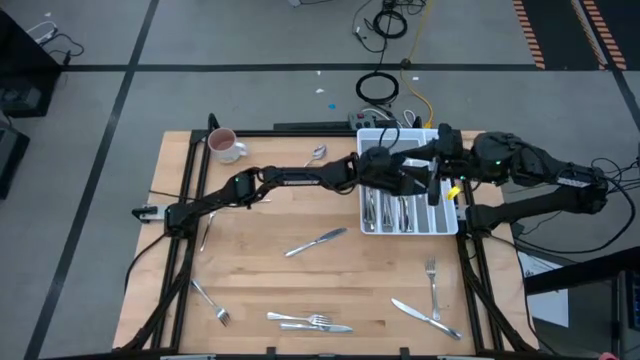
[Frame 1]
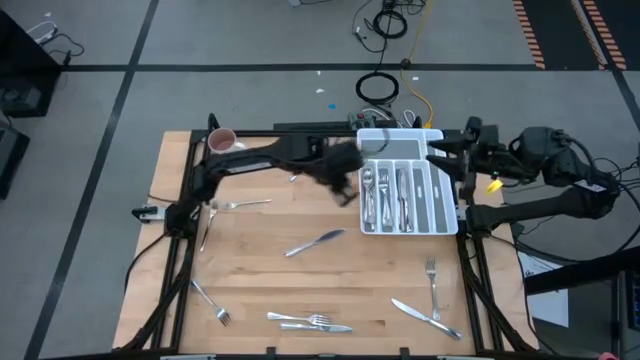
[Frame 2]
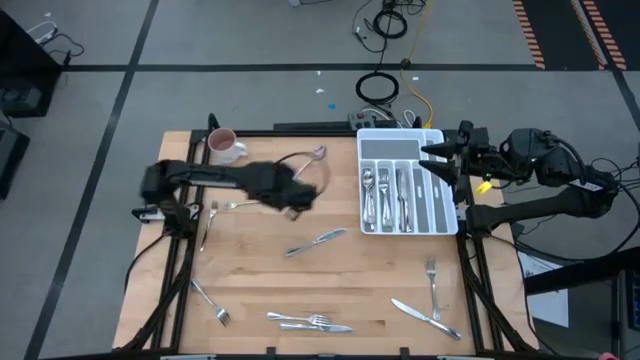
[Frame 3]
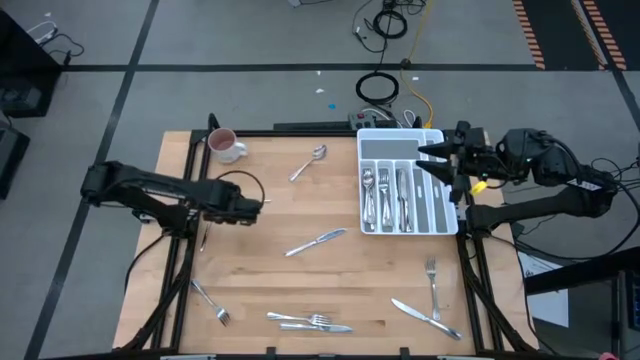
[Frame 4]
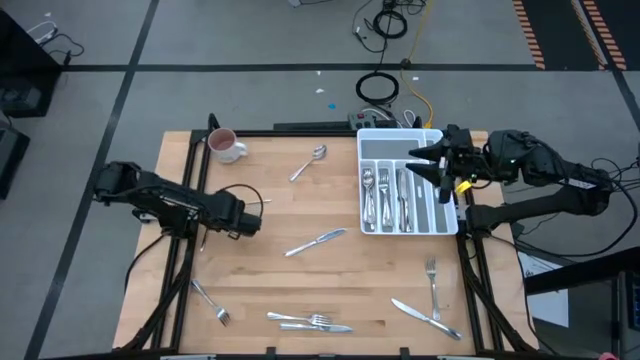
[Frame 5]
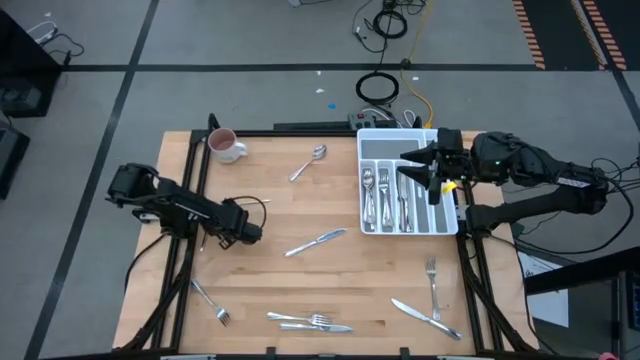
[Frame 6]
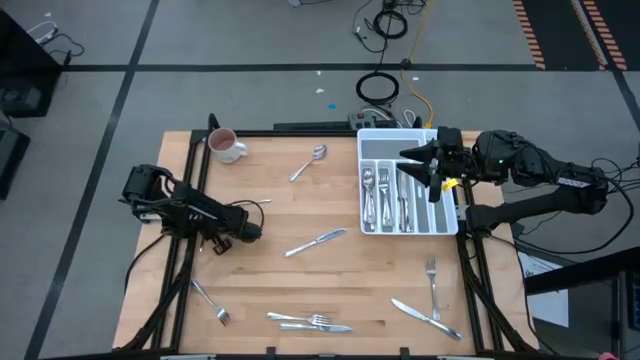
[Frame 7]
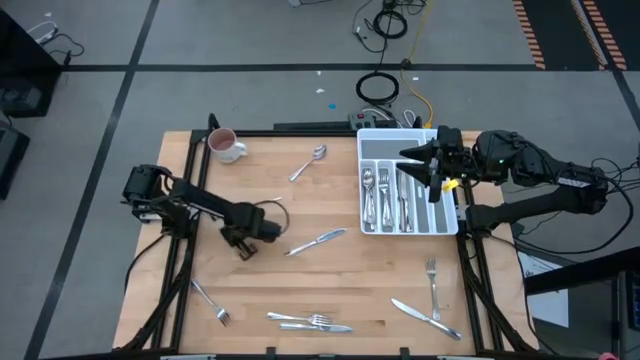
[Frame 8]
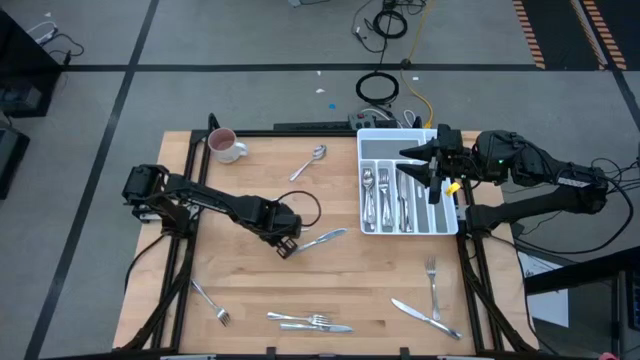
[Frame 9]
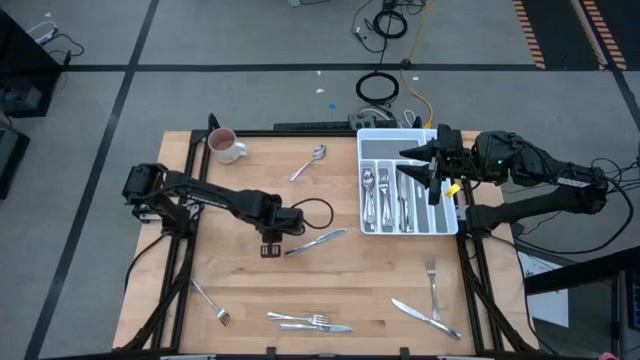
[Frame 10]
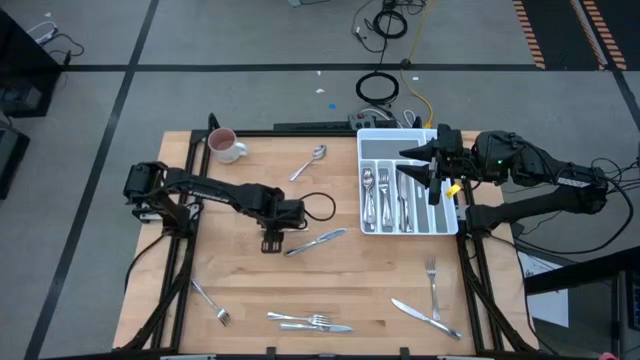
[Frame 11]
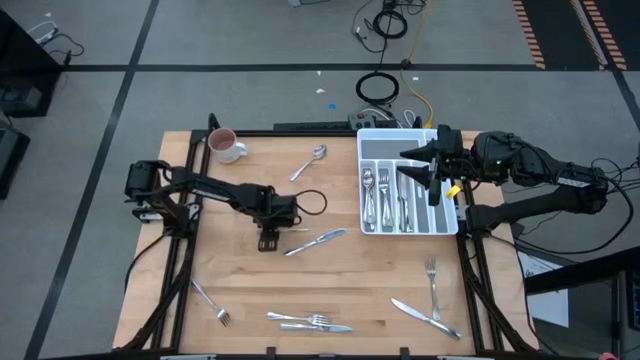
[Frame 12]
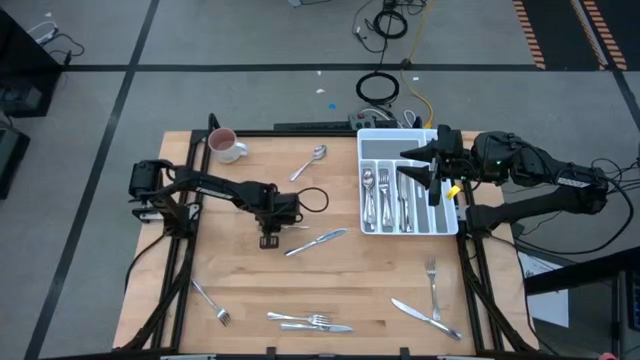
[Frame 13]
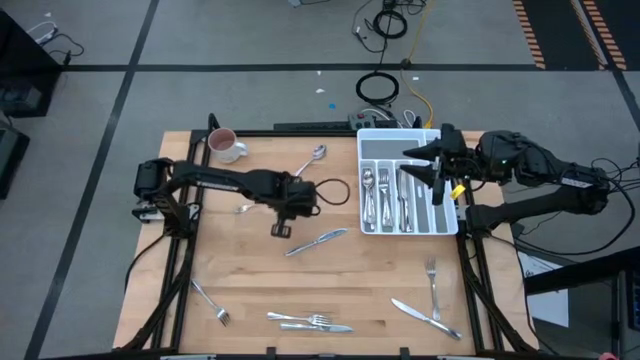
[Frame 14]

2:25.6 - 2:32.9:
Task: Sort silverware
Put the silver fork into the silverware tray

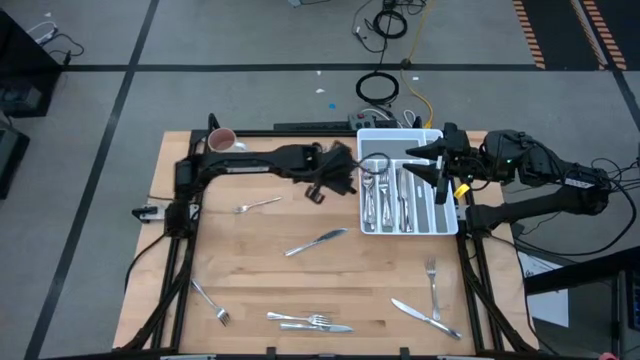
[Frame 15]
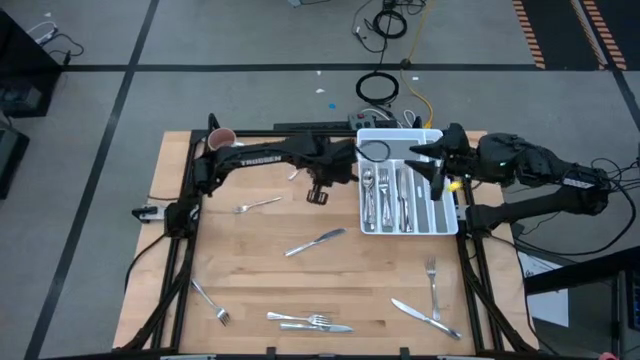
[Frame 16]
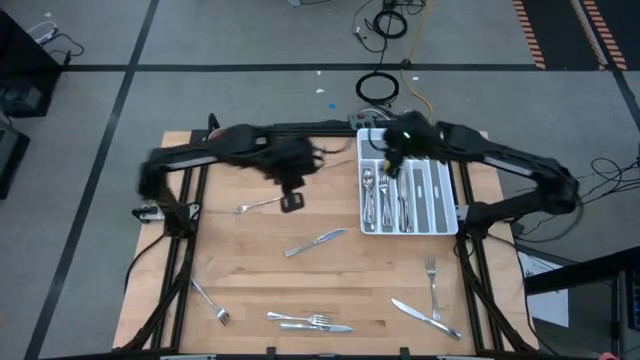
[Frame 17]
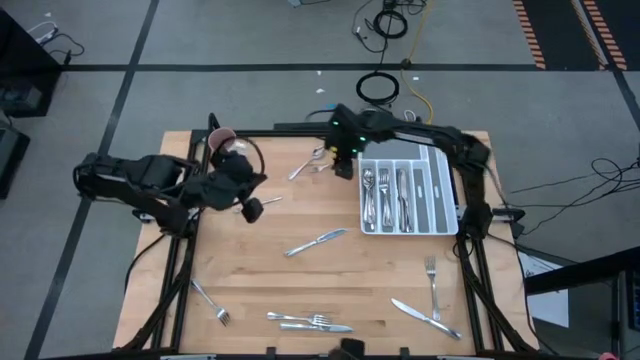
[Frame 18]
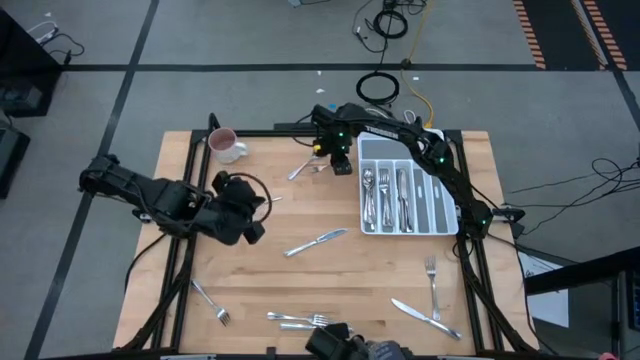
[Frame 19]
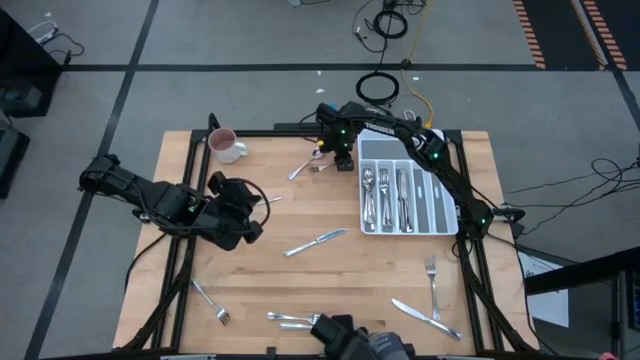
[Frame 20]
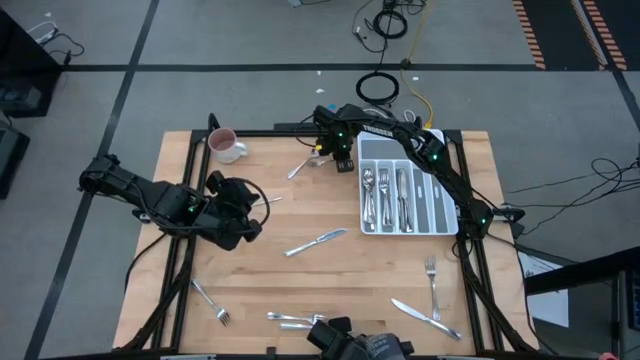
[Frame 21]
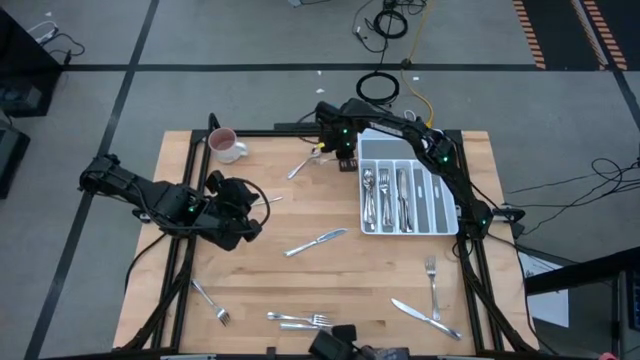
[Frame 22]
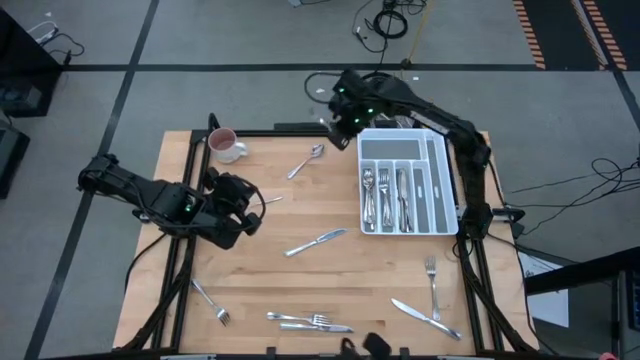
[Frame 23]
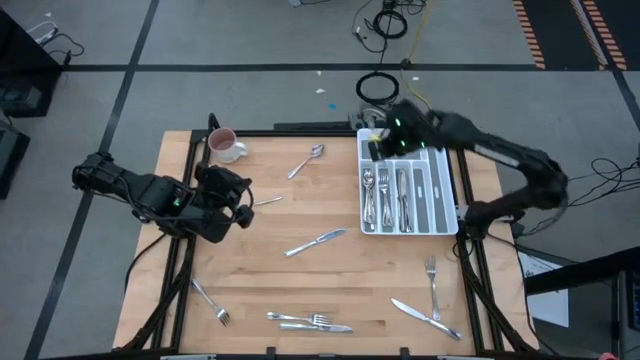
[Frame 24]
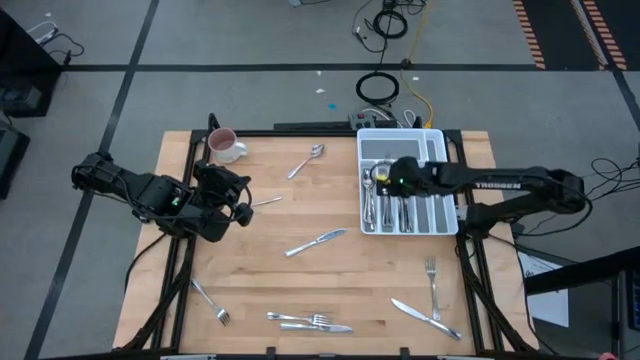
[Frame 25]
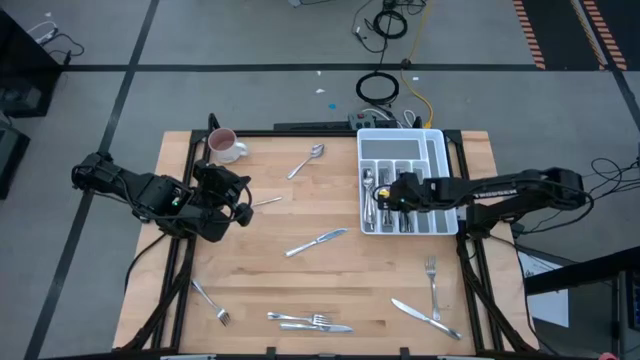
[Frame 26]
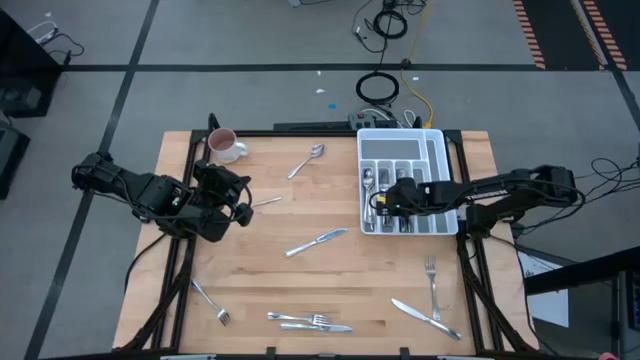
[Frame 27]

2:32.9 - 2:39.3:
Put the silver fork into the silverware tray

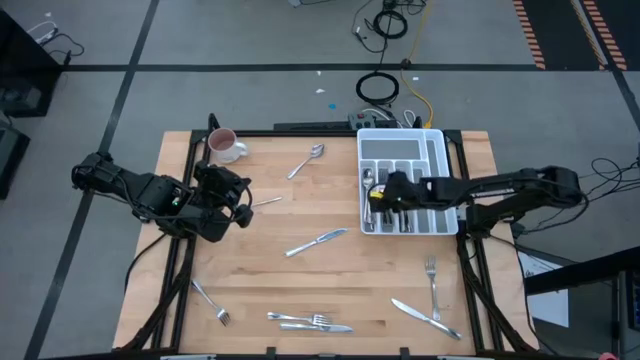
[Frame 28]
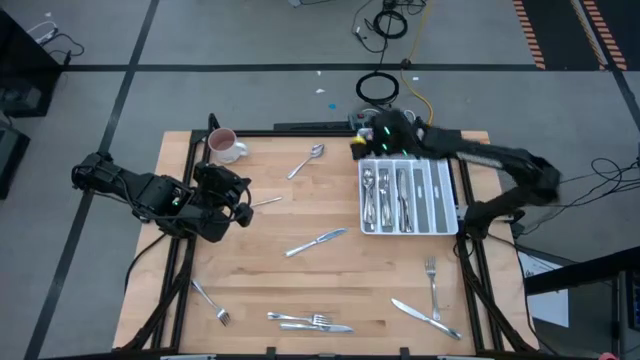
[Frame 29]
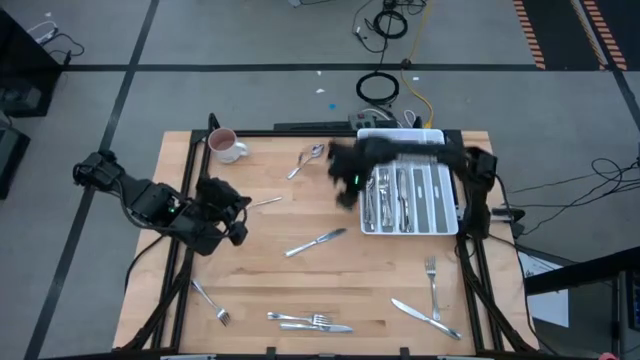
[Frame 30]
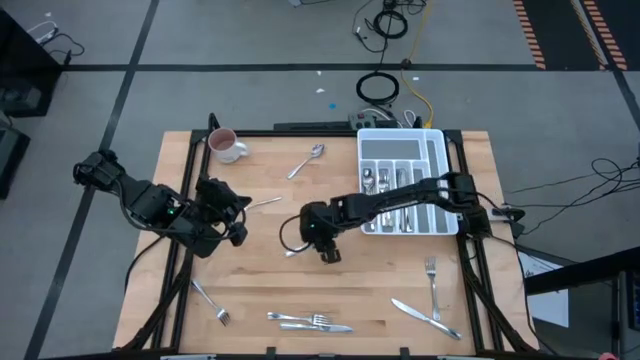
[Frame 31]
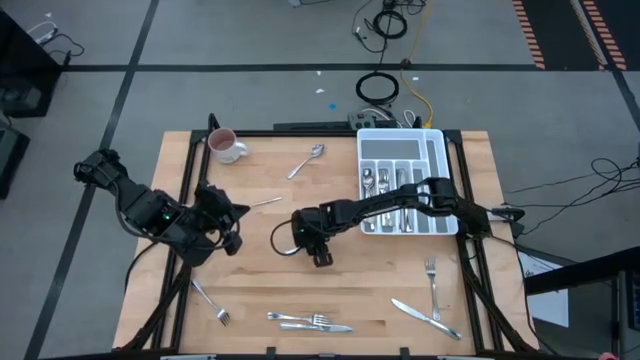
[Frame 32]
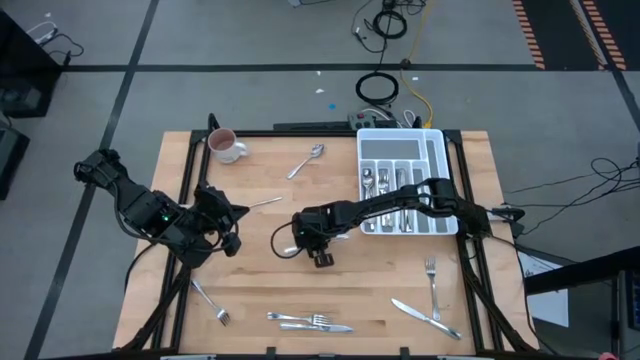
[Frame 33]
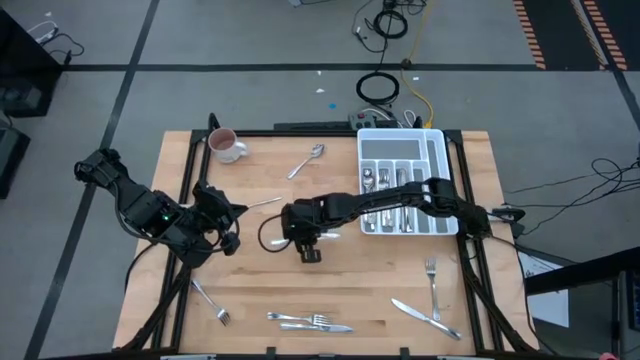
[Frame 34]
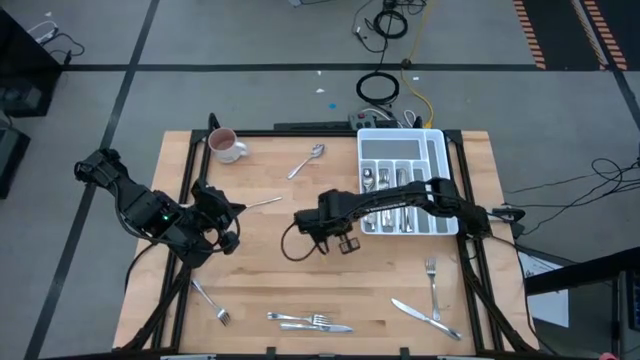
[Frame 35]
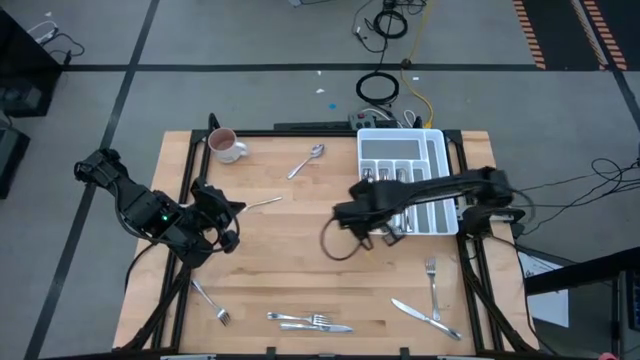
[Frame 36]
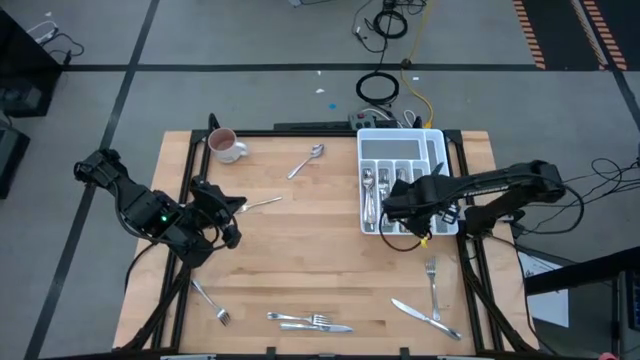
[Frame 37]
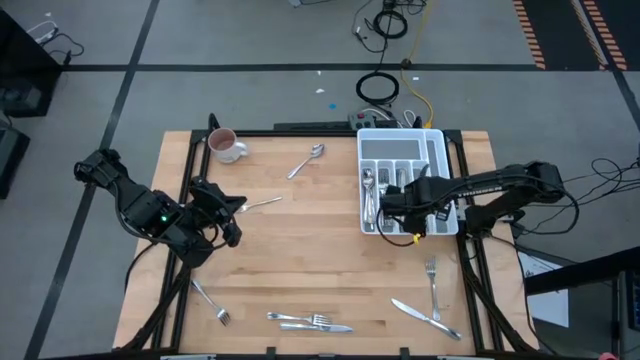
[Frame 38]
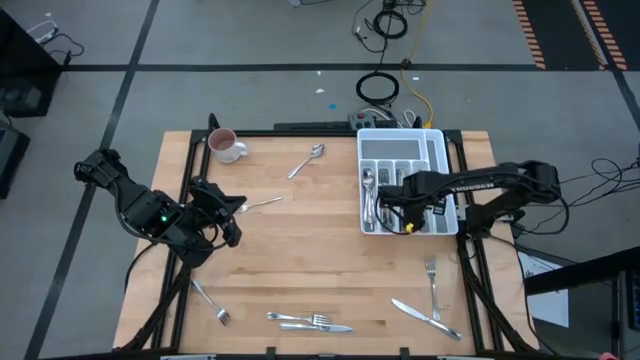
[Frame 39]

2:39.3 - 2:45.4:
Put the silver table knife into the silverware tray

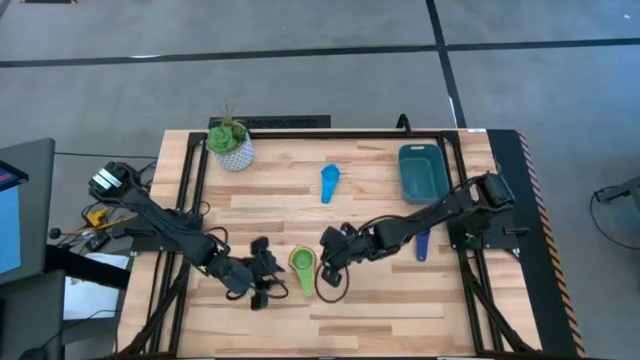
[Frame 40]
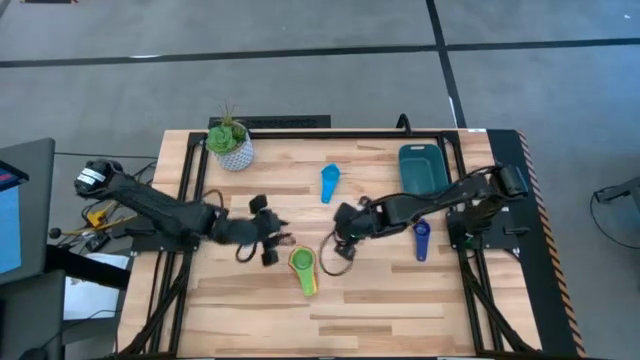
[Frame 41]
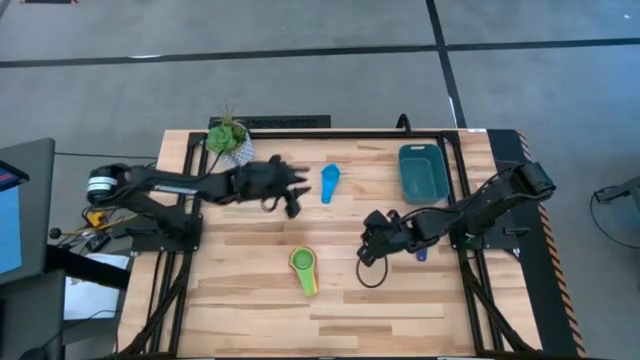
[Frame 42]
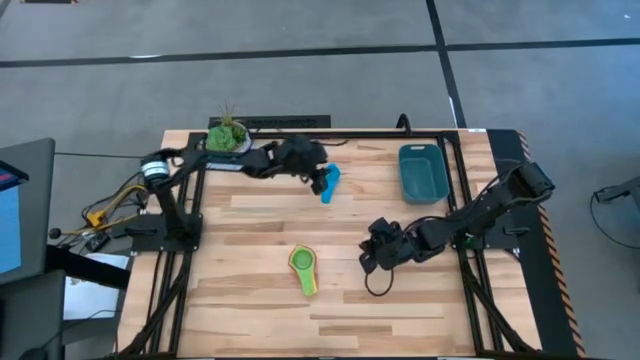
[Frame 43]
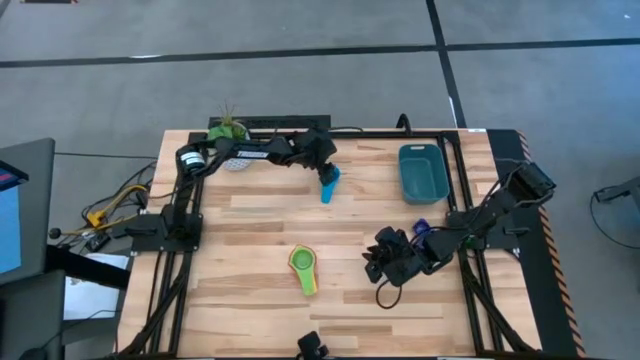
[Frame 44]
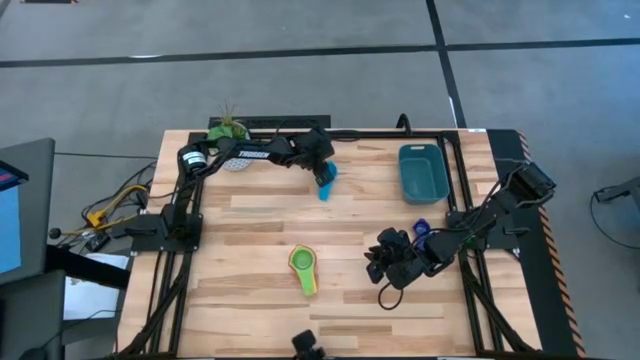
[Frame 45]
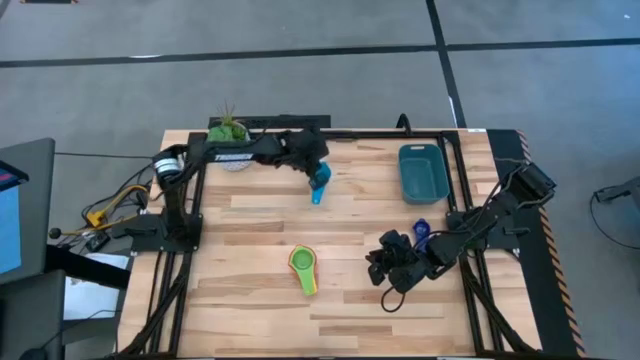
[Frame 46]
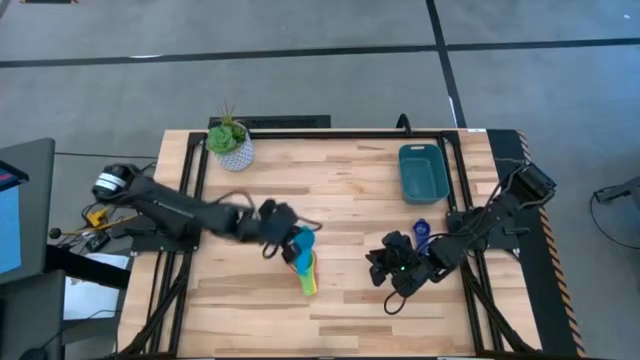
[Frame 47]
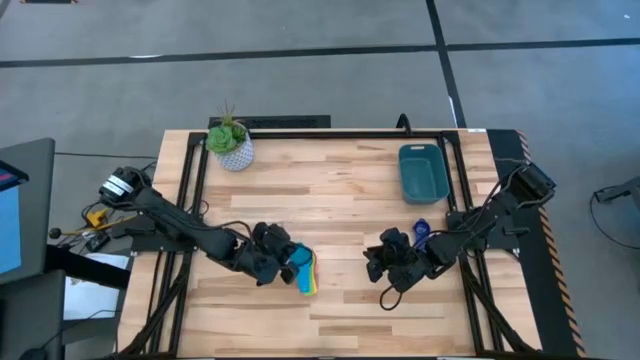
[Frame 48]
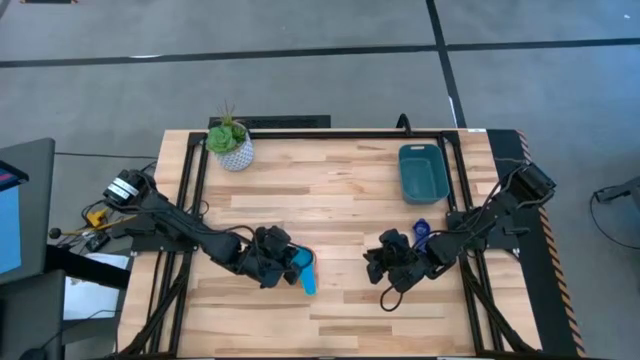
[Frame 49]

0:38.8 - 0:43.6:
Task: Nest measuring cups in basket
Stack the light blue measuring cup into the green measuring cup
